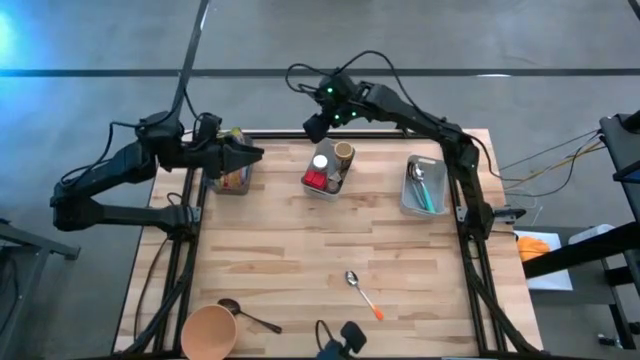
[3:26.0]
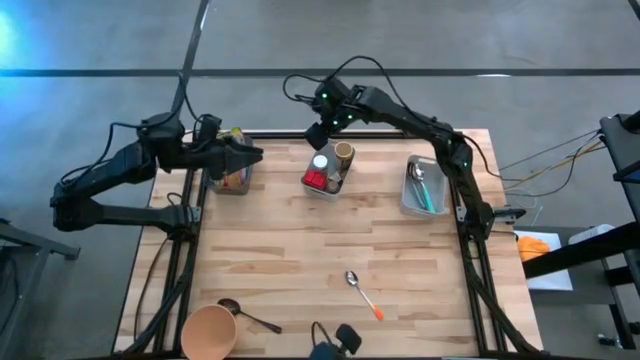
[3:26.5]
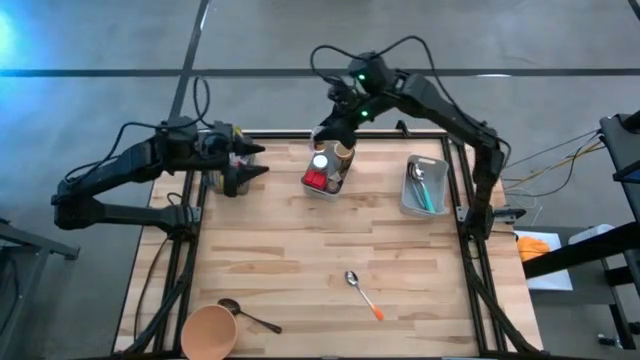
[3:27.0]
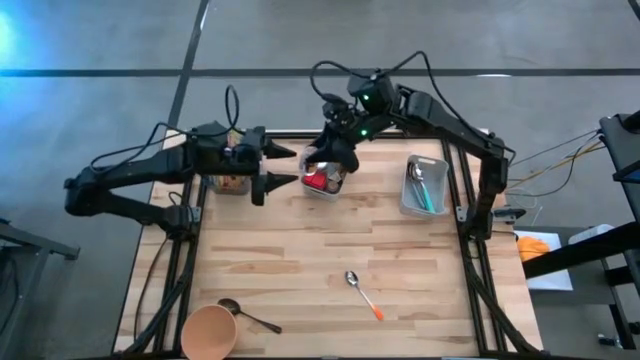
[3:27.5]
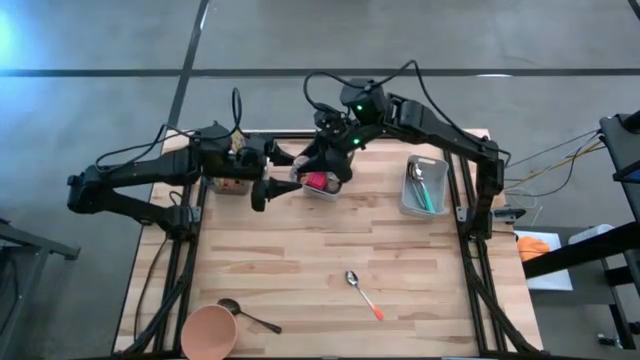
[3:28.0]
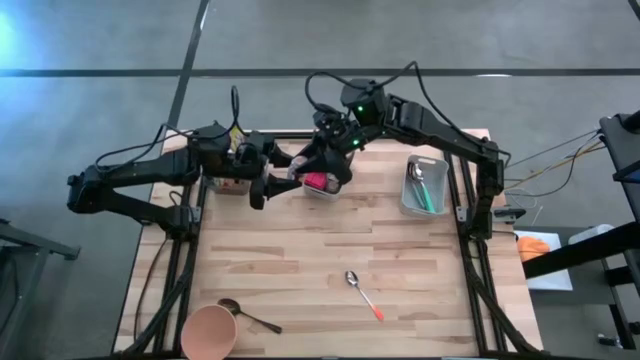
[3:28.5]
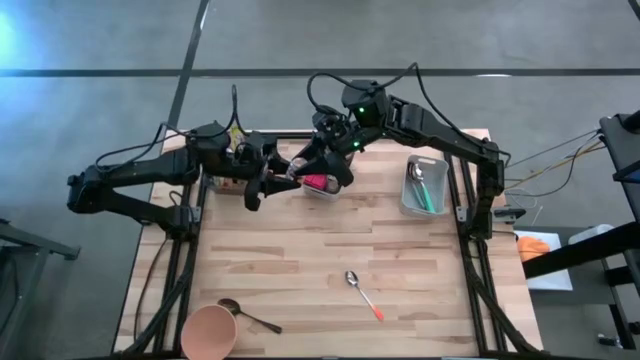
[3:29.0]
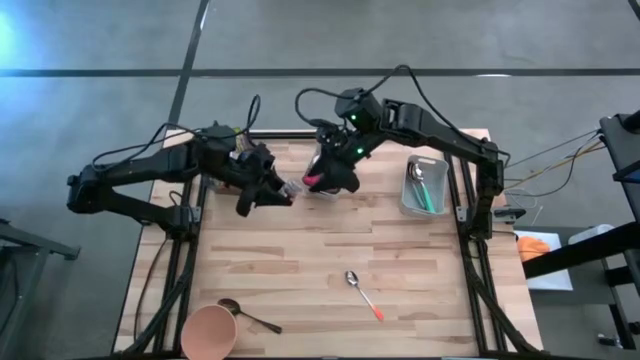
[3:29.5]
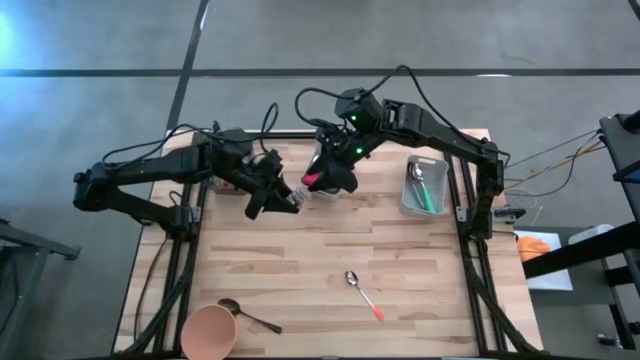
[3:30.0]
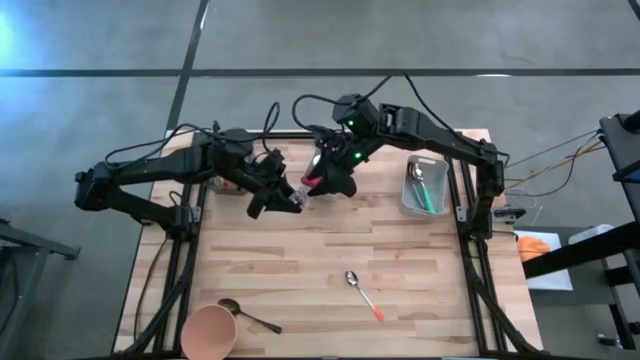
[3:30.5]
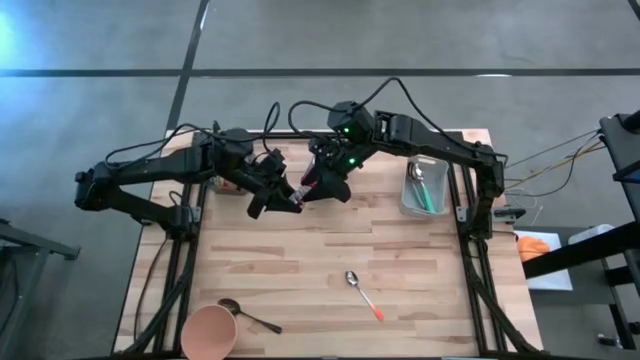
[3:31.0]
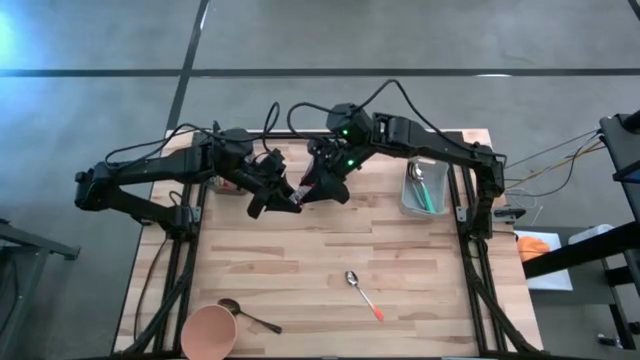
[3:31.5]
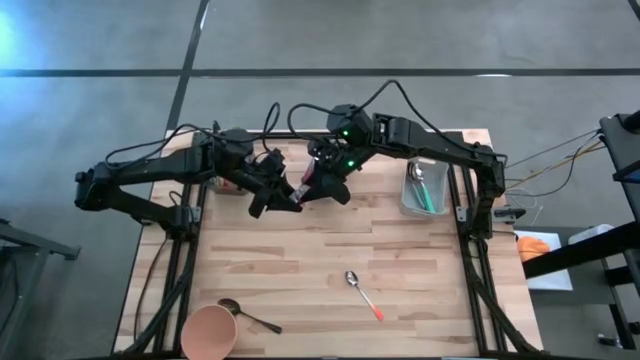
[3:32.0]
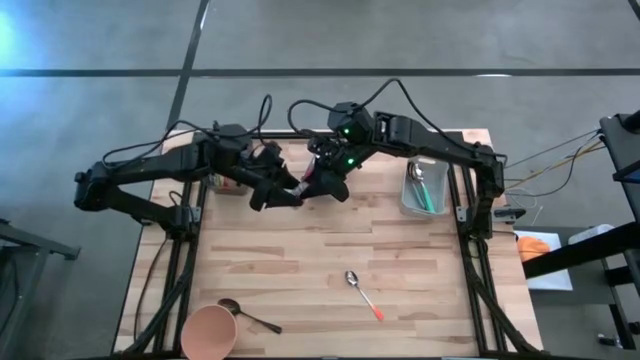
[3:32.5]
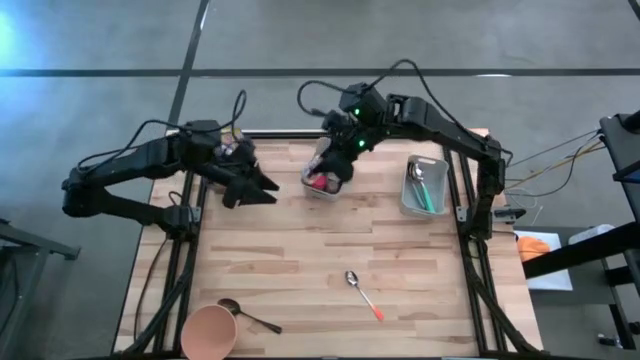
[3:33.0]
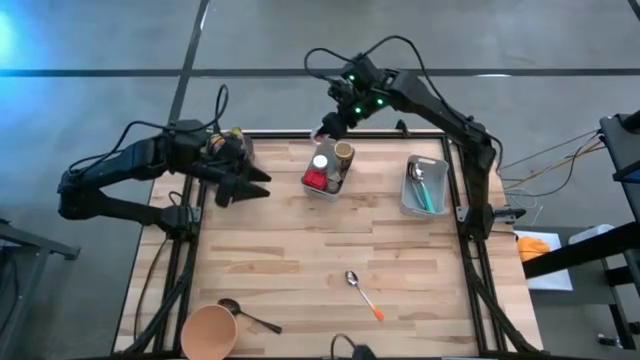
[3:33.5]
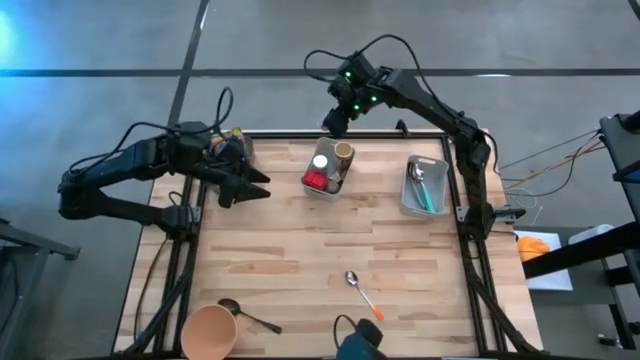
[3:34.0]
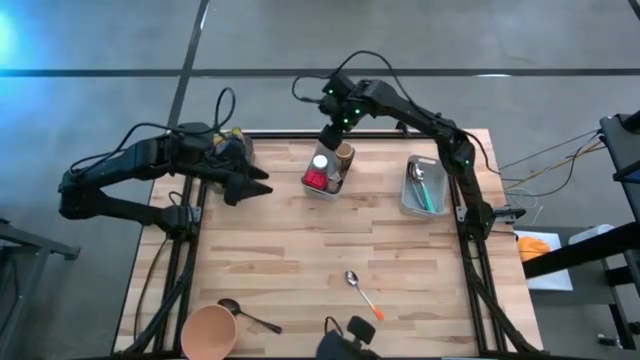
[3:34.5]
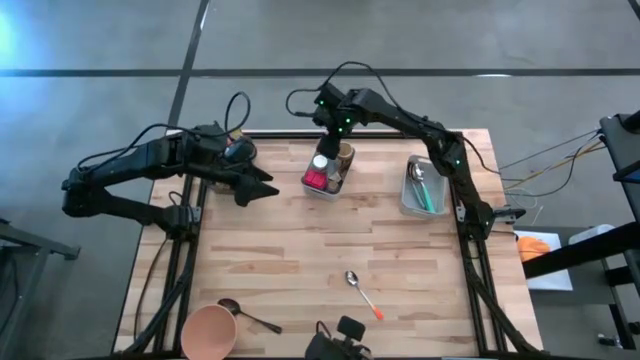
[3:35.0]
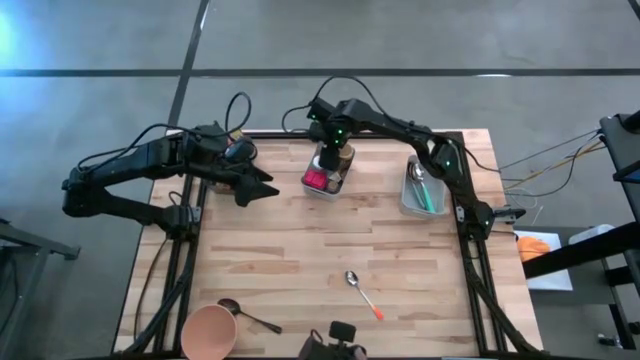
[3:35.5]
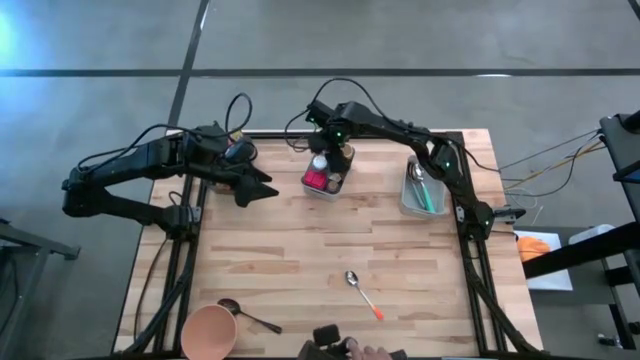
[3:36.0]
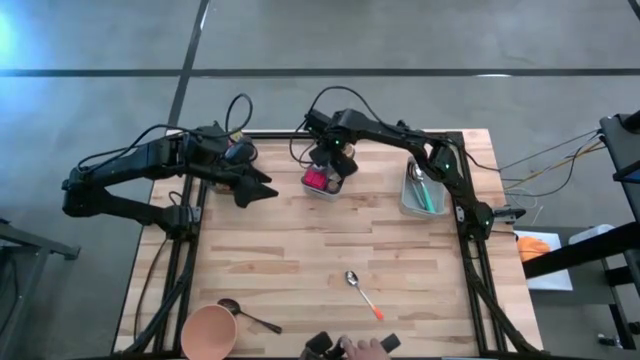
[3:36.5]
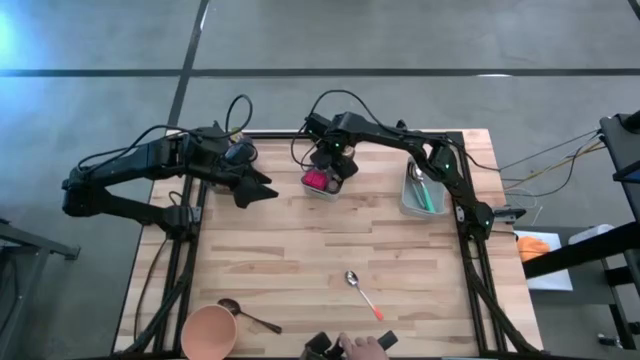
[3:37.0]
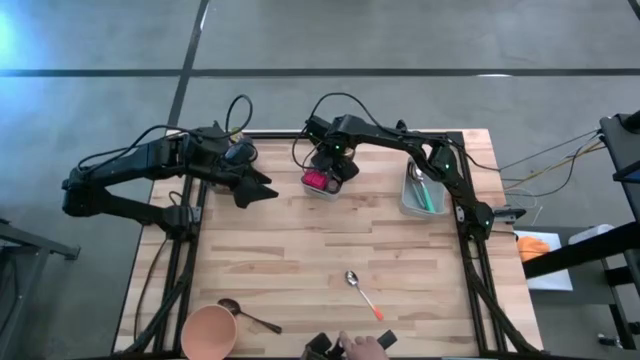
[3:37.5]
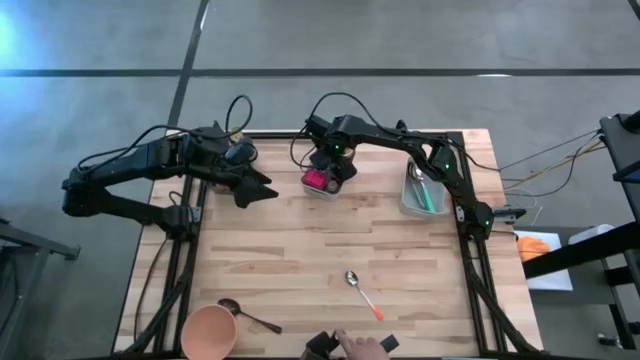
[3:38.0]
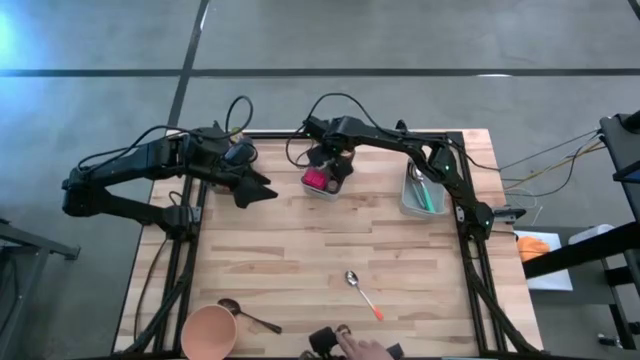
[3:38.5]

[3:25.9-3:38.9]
Put the brown seasoning bottle into the left gray bin

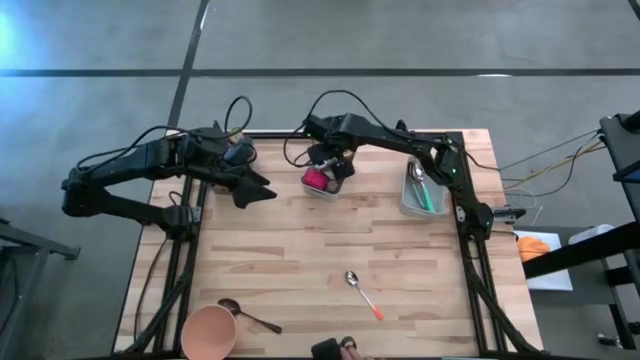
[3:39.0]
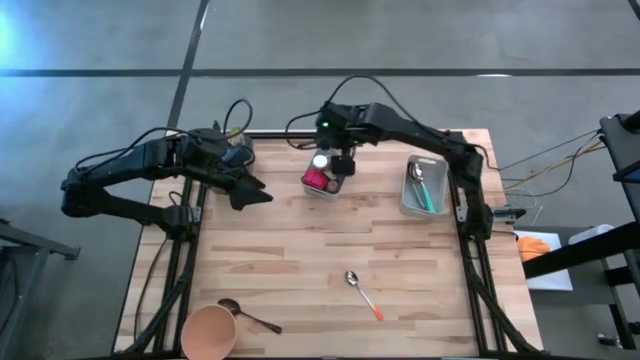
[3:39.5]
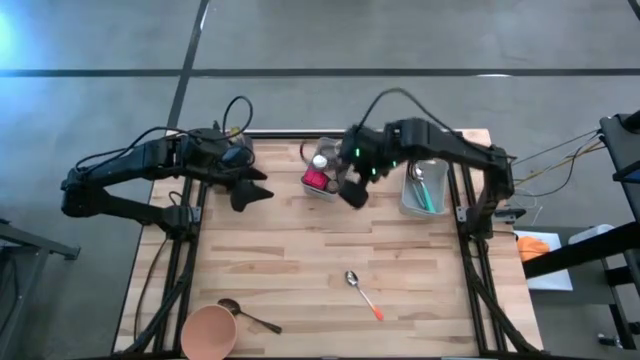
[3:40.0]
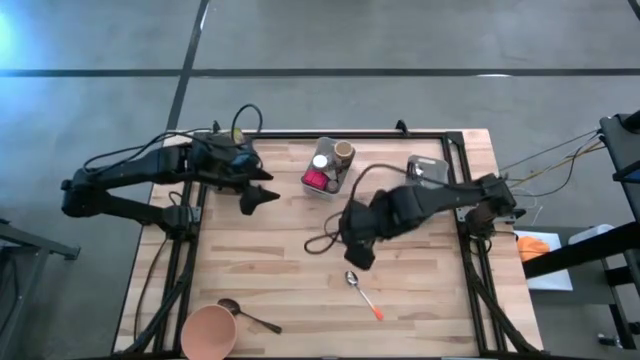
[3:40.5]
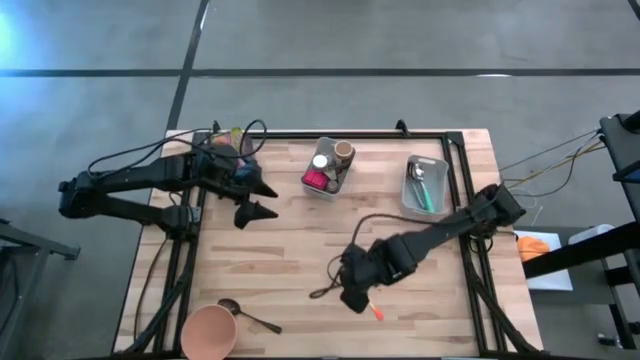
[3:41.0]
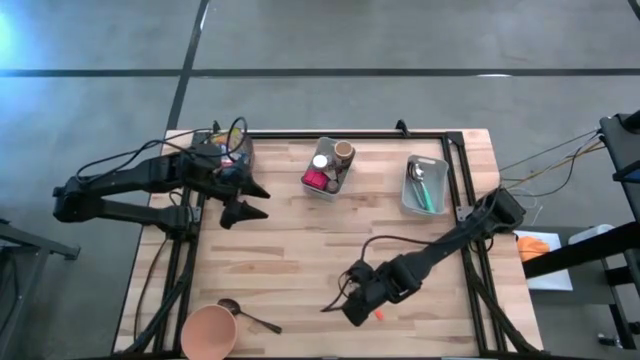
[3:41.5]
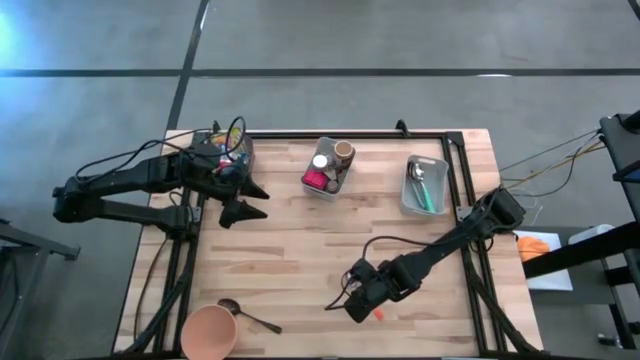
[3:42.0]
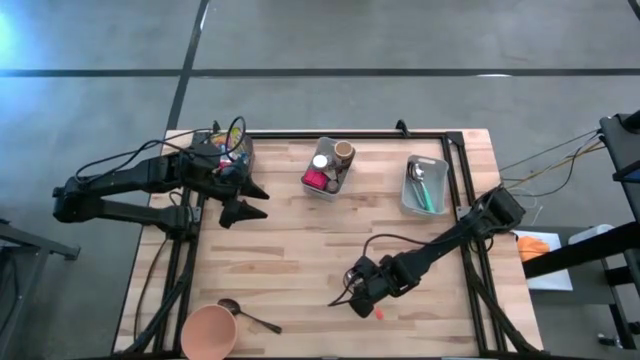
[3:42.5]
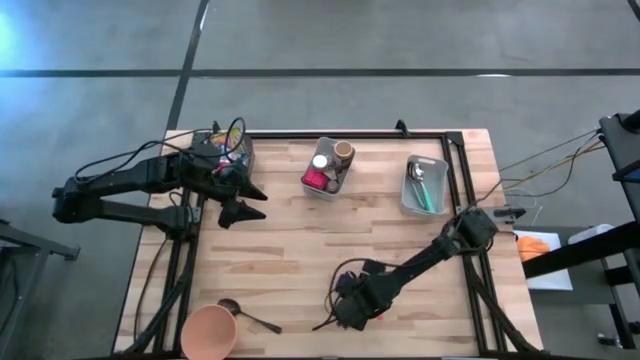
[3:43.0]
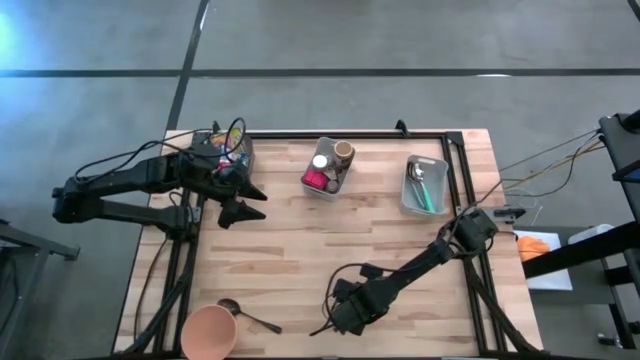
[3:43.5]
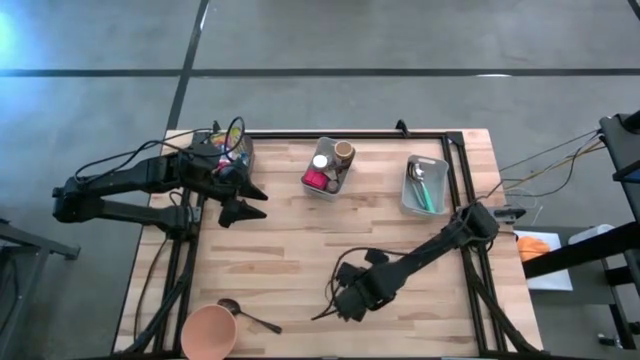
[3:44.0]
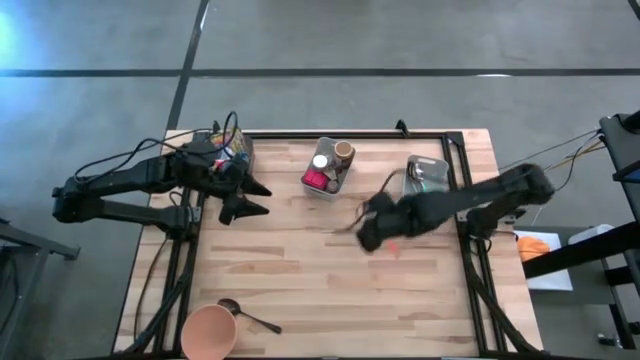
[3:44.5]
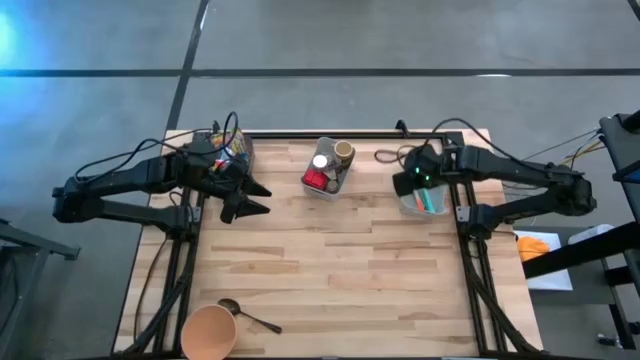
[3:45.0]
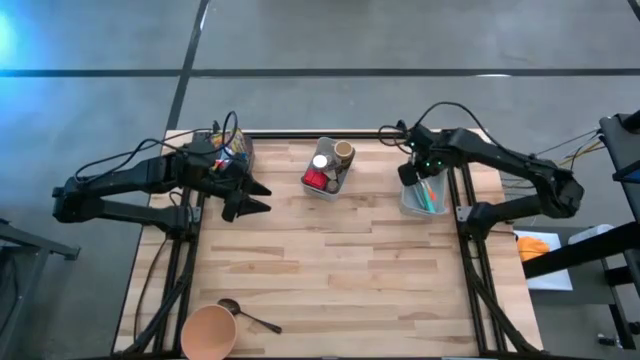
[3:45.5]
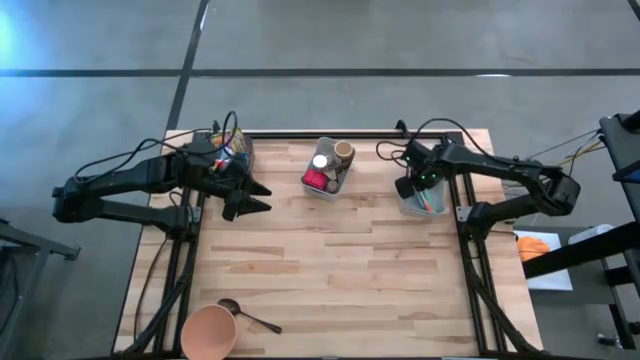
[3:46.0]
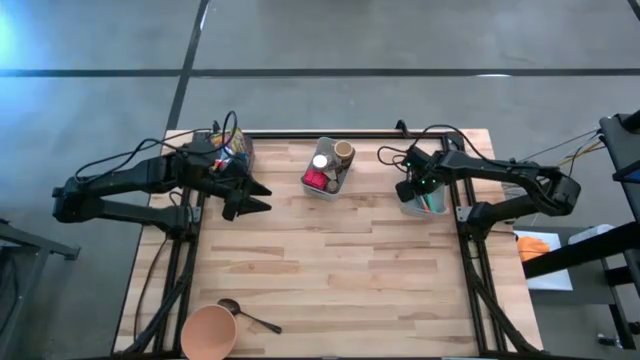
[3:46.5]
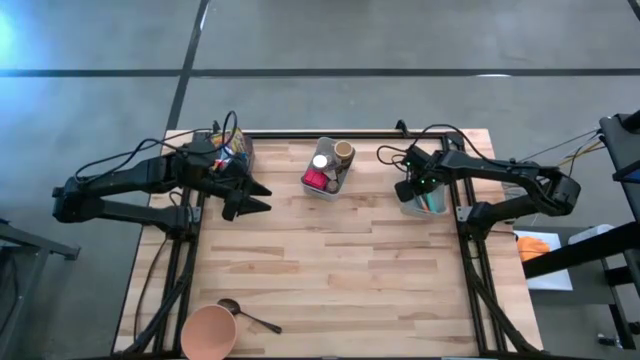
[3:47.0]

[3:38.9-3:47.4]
Put the orange spoon into the right gray bin
